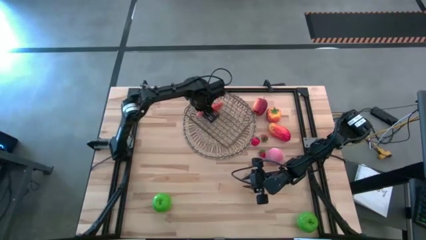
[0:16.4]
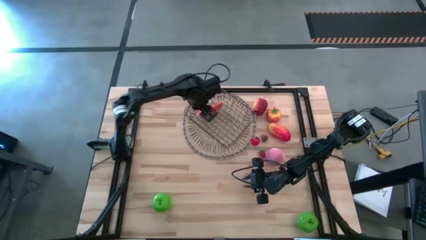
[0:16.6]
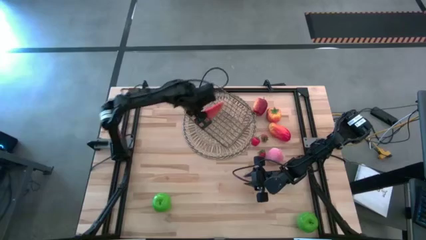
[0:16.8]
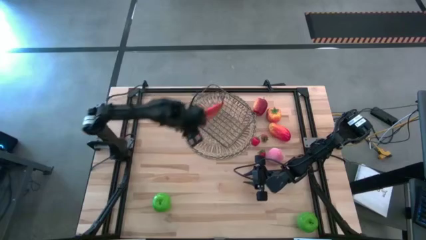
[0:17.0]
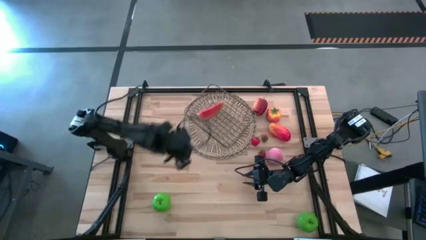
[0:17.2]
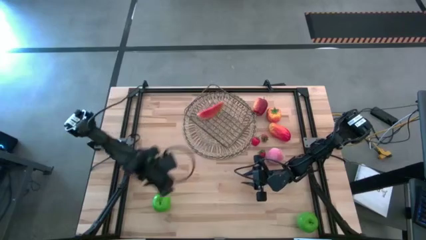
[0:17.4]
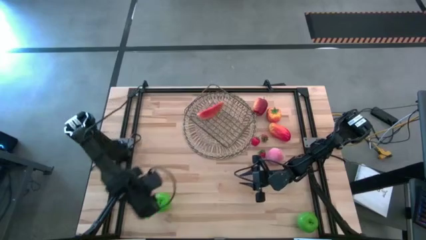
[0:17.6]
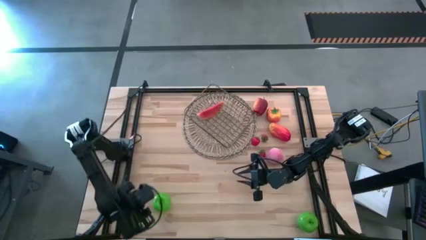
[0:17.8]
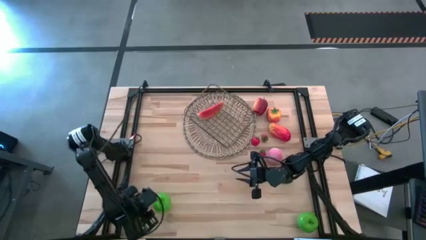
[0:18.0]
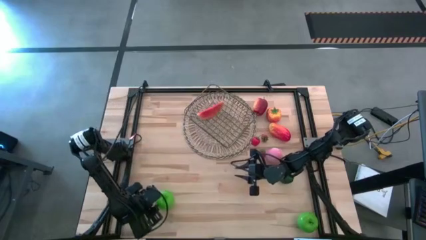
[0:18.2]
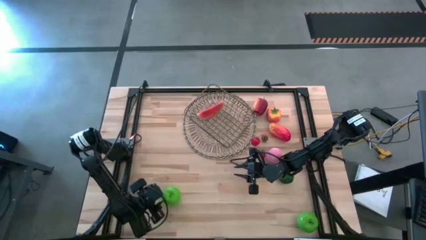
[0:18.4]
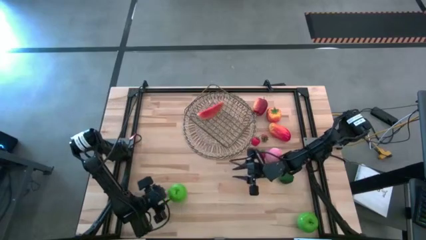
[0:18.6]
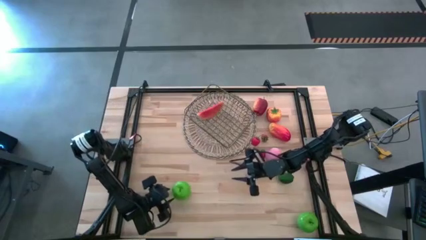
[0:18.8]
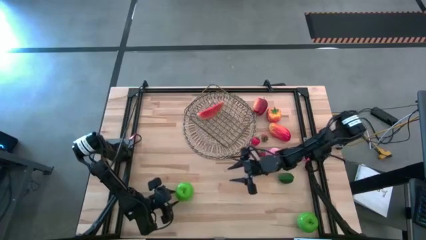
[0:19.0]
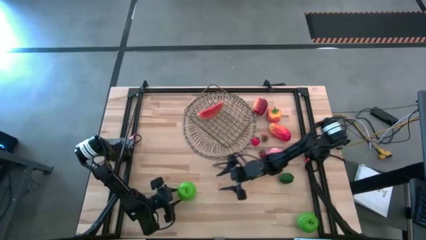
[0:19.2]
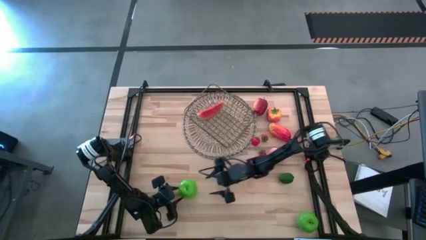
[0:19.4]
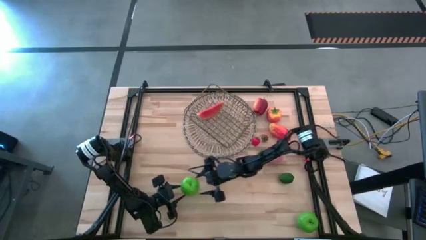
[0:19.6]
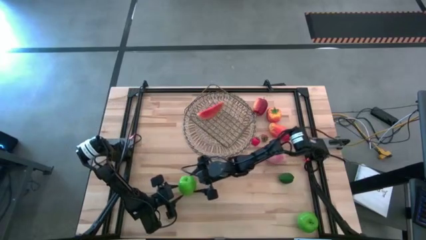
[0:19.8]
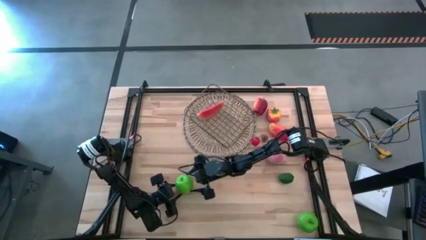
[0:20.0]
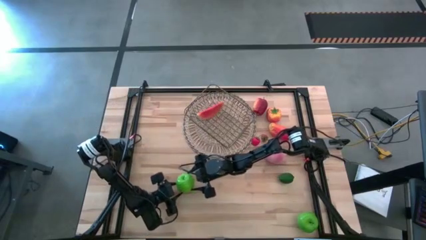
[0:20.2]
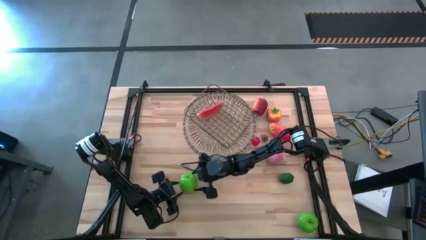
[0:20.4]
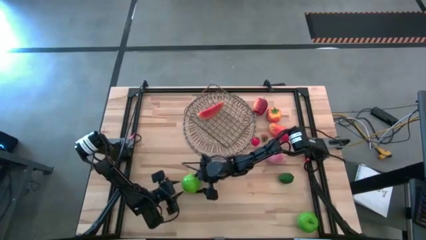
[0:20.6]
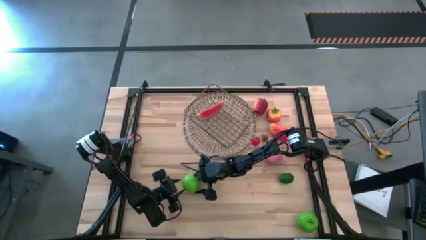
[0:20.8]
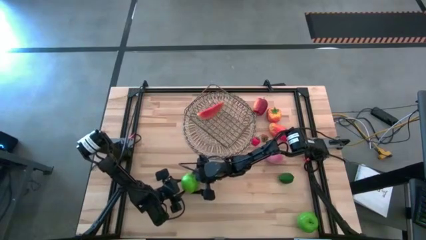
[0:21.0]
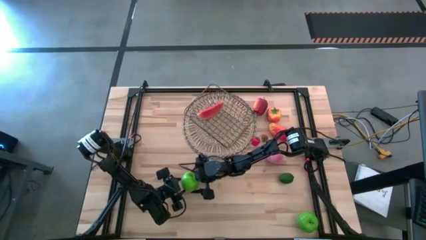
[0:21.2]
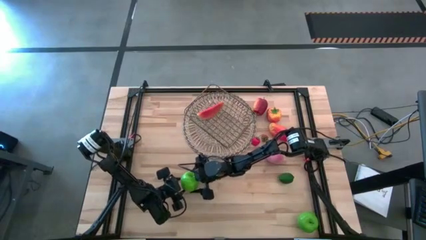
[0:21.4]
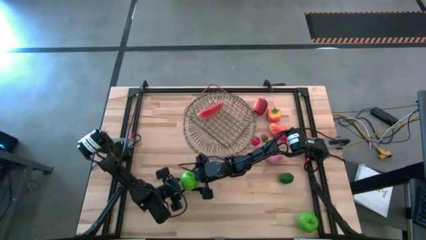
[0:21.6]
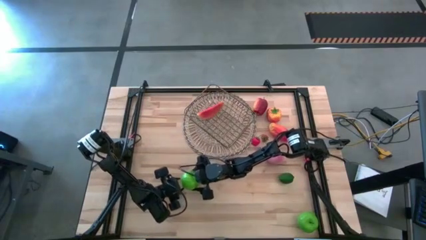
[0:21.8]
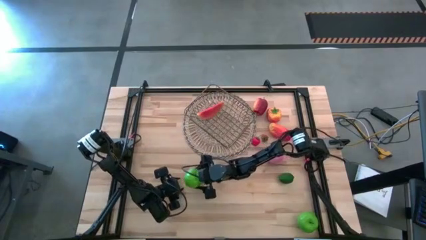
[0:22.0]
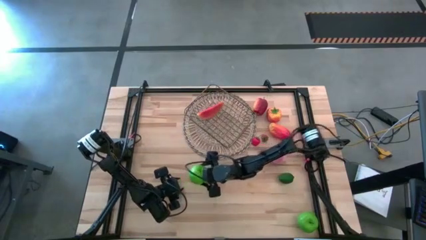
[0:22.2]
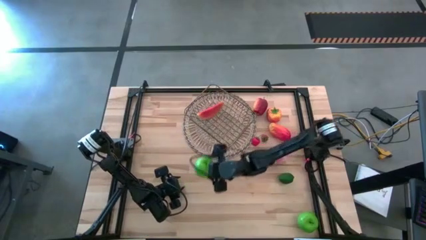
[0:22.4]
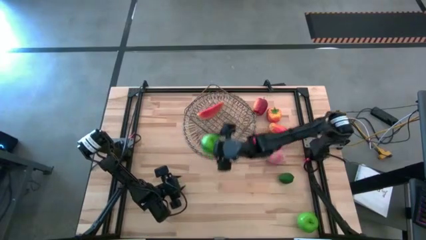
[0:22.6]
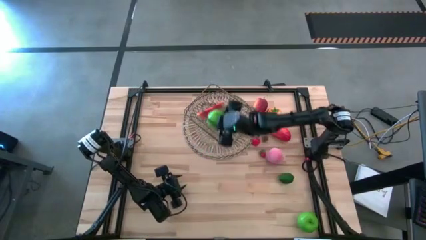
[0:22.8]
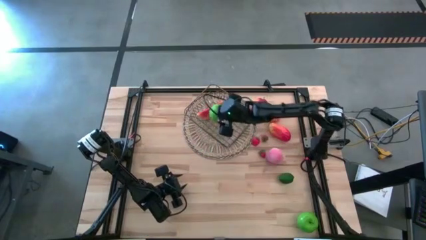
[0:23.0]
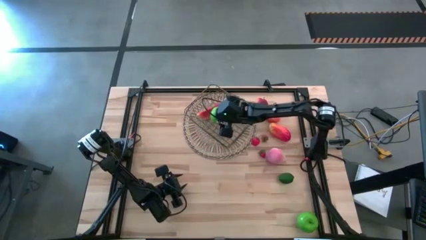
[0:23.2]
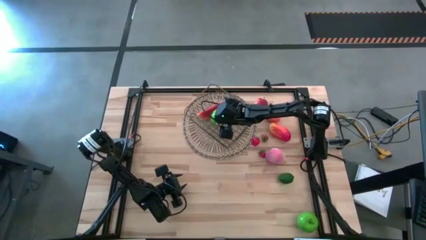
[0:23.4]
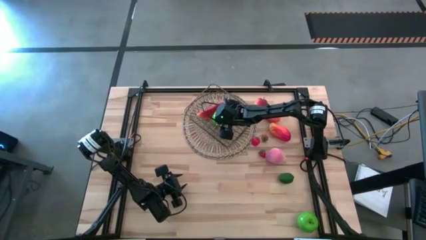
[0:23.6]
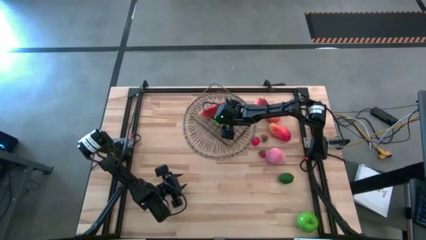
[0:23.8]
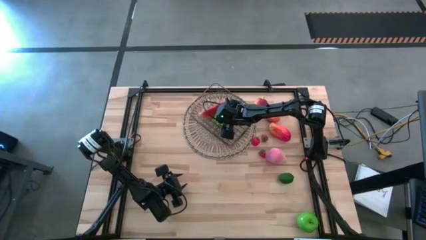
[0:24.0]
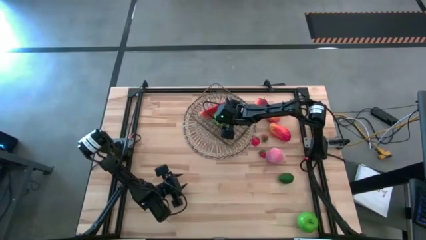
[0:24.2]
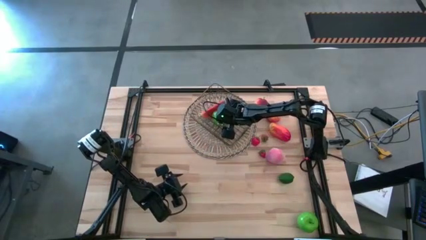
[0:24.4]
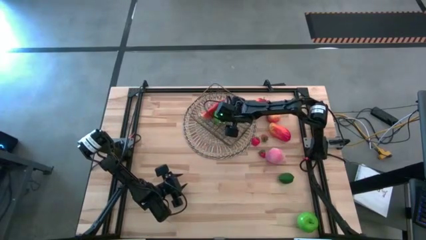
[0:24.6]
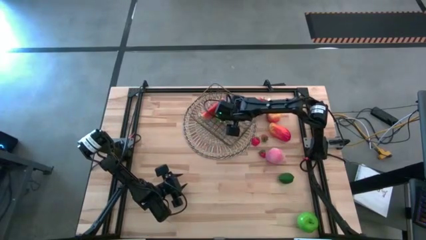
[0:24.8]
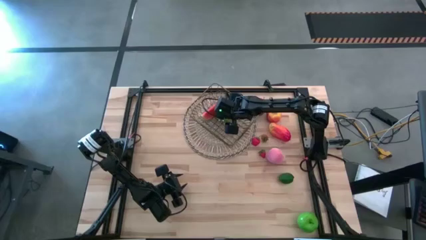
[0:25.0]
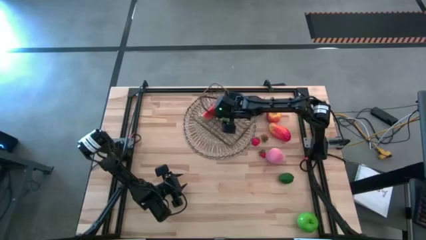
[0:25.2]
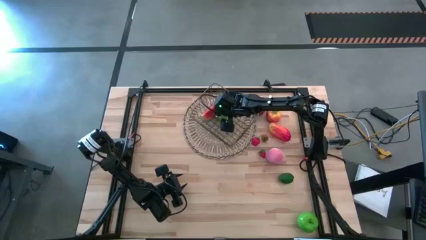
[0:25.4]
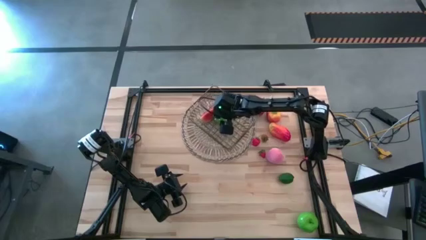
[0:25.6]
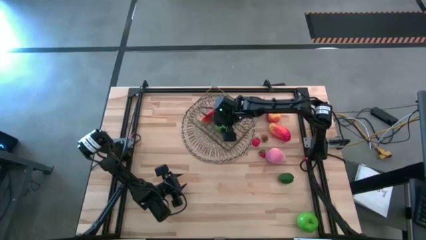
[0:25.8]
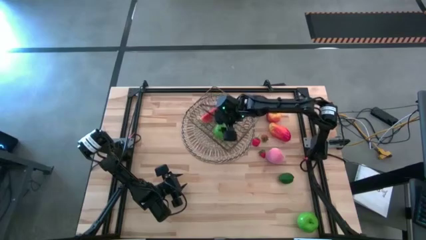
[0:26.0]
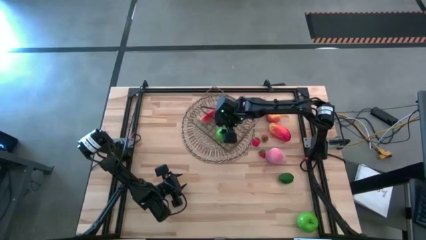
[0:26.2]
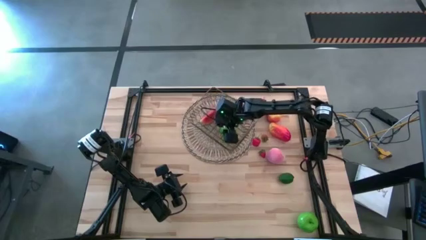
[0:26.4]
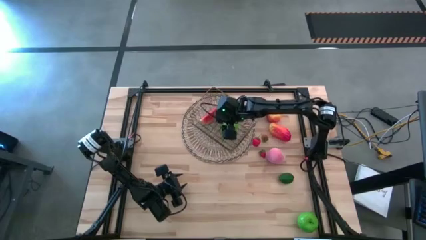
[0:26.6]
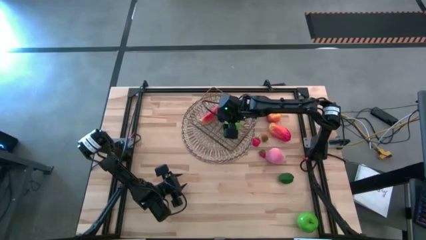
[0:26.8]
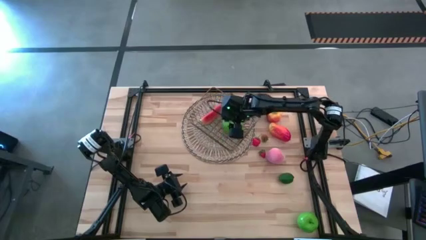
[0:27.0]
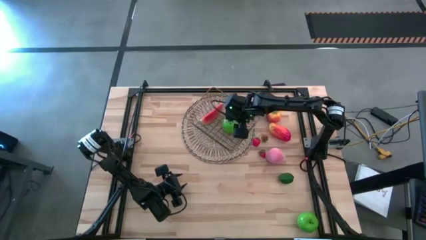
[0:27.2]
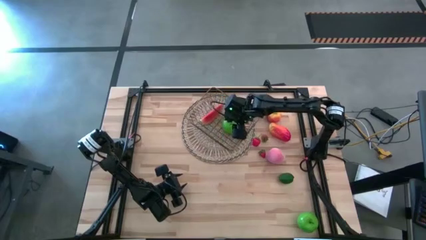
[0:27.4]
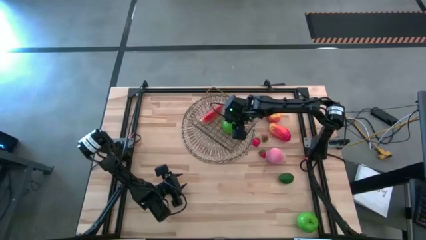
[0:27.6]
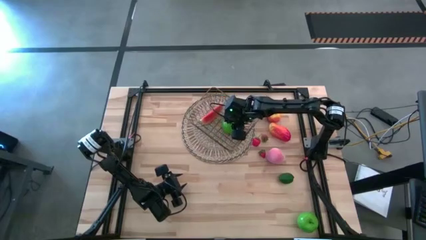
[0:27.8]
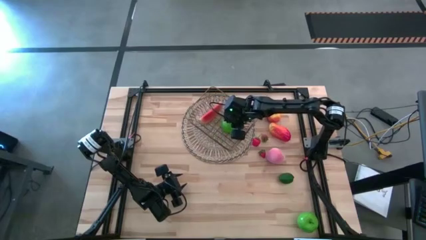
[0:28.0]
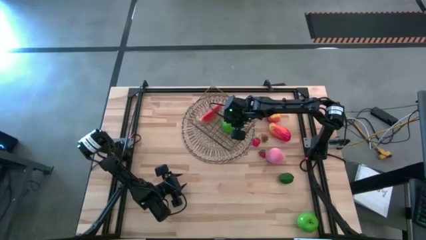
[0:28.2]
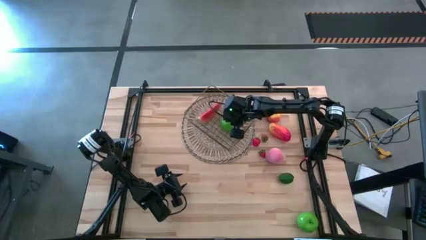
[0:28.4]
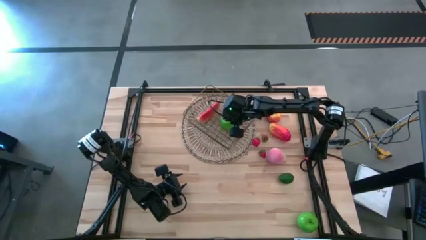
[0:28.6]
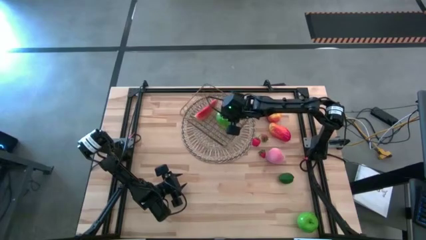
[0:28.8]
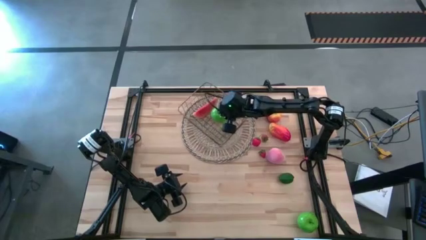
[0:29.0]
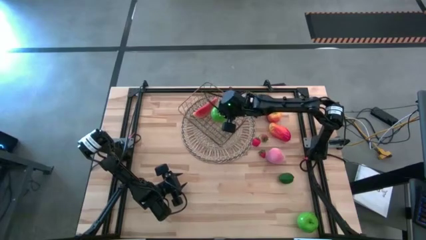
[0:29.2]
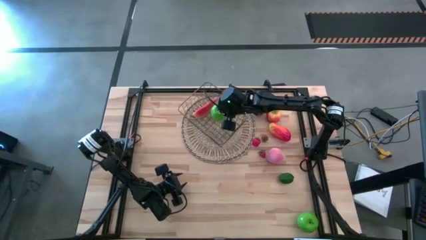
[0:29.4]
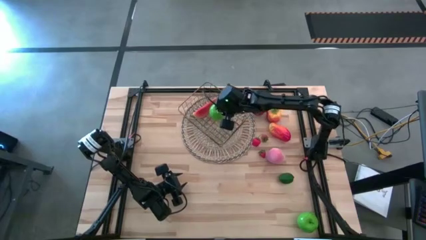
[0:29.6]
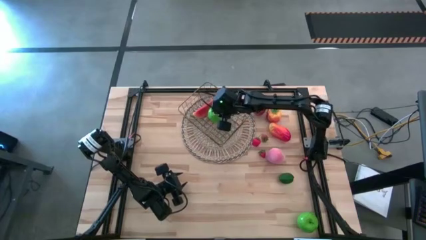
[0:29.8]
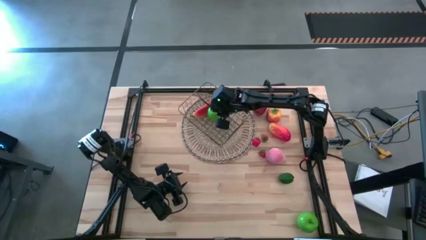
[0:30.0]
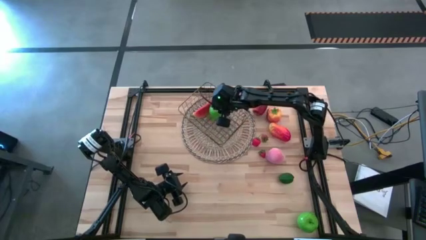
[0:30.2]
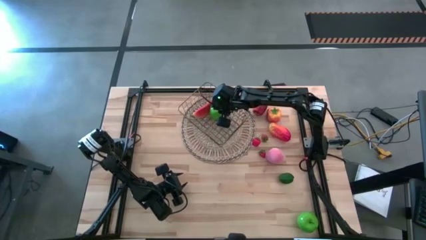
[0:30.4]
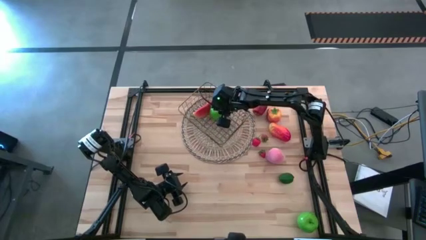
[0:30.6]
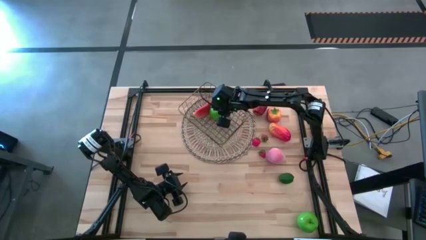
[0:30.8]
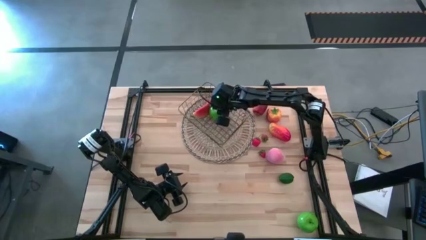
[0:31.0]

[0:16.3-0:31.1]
Task: Build produce basket
Put the left green apple into the gold wire basket

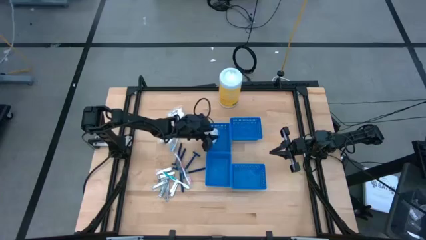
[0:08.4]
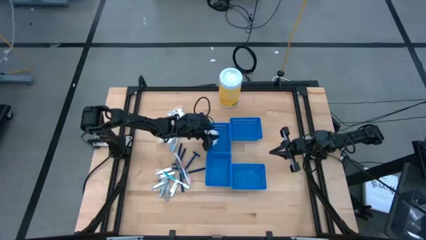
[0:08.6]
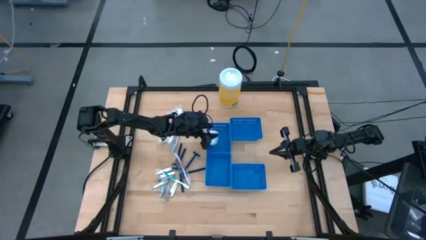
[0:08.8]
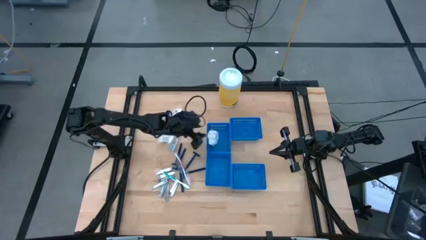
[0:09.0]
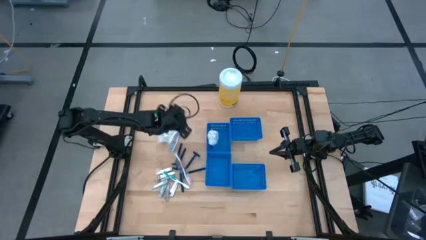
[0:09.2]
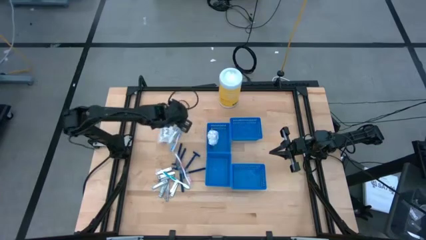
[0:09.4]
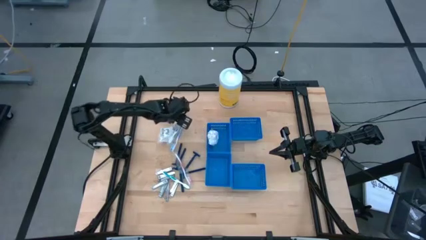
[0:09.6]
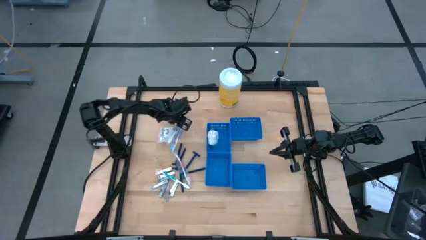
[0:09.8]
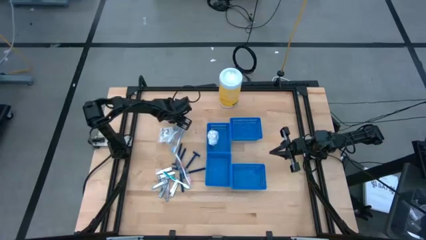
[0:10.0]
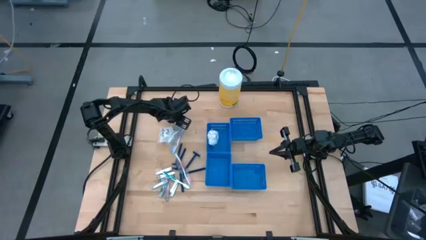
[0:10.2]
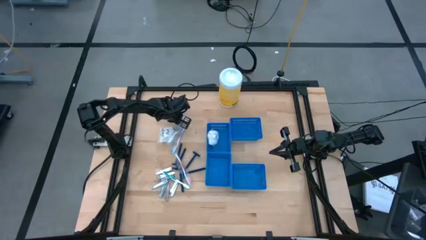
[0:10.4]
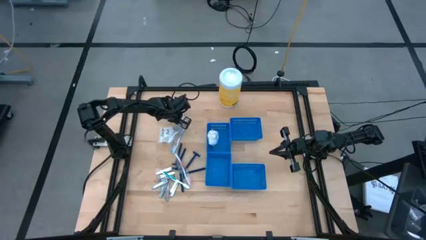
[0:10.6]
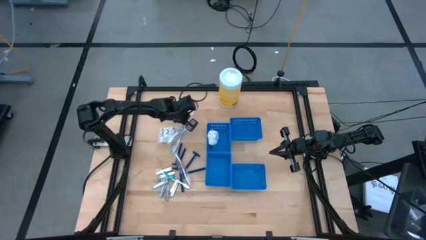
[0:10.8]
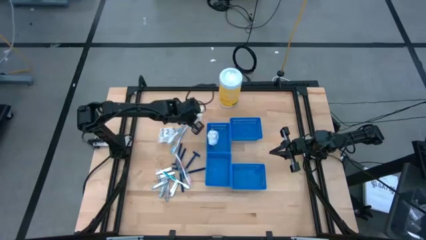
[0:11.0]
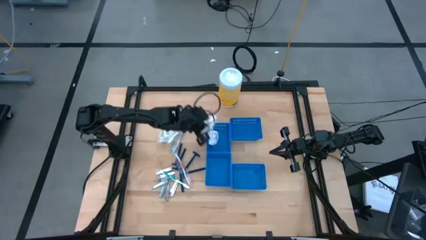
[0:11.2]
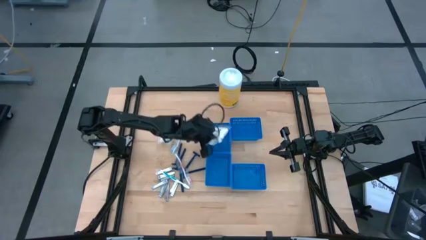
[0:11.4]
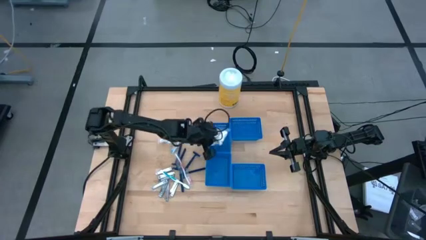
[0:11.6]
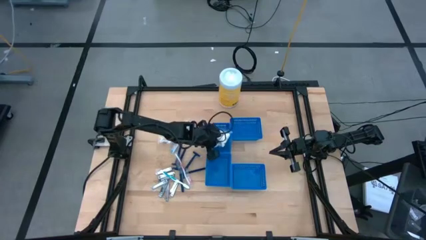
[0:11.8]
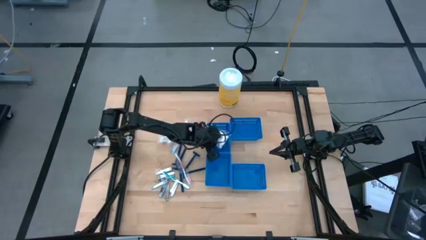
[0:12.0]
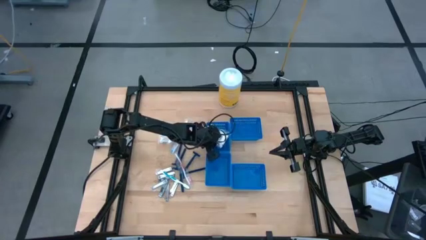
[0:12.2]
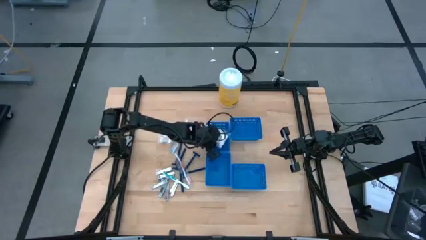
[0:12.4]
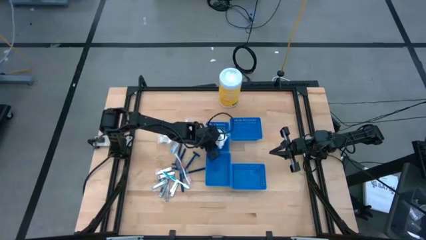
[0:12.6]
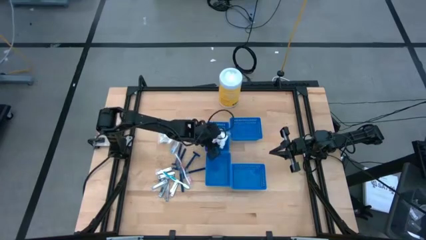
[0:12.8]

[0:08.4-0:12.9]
Task: Pick & Place Travel size toiletries
Put the transparent cotton pack into the top left blue bin
